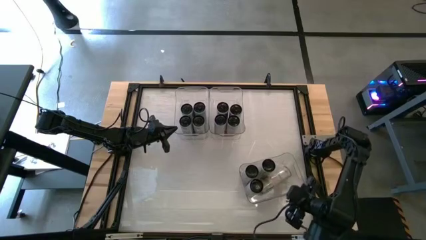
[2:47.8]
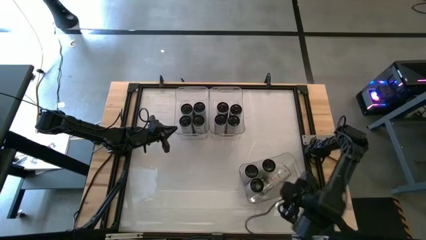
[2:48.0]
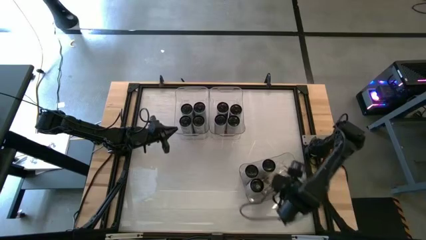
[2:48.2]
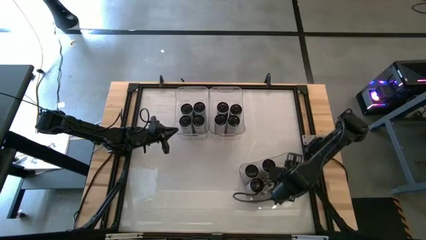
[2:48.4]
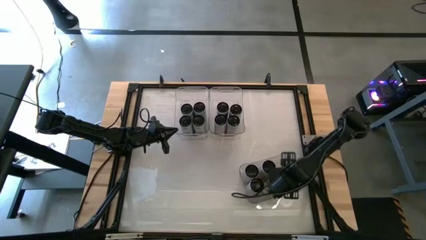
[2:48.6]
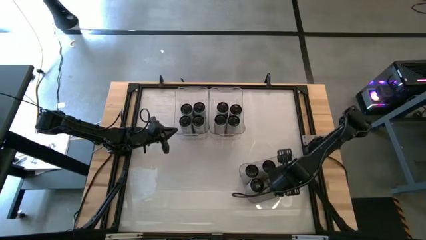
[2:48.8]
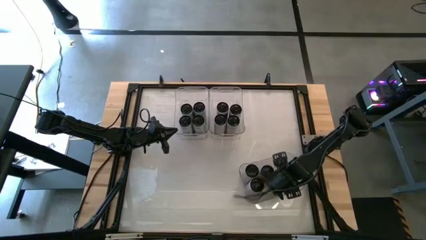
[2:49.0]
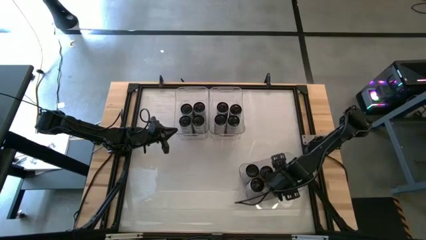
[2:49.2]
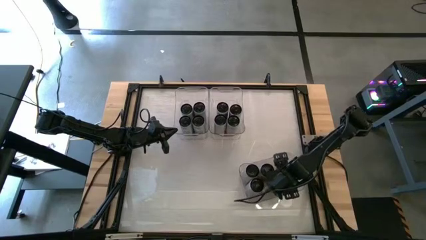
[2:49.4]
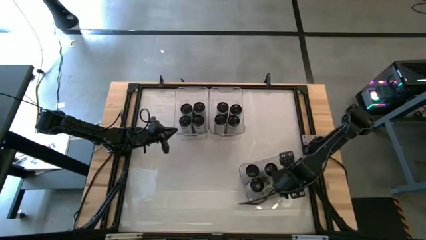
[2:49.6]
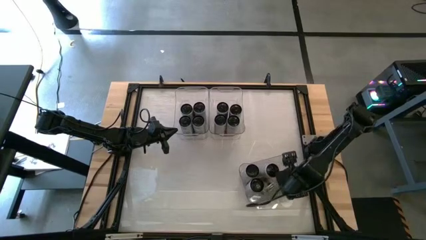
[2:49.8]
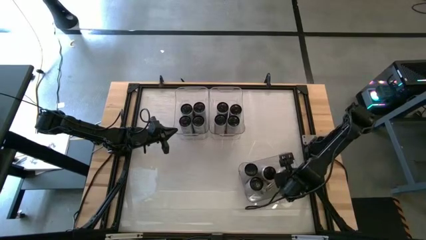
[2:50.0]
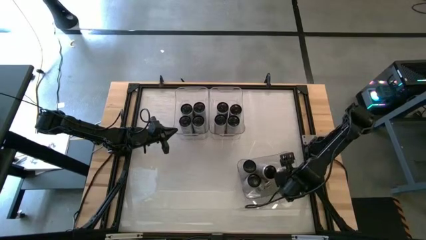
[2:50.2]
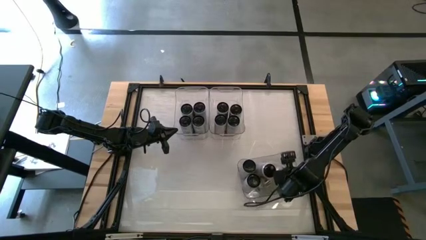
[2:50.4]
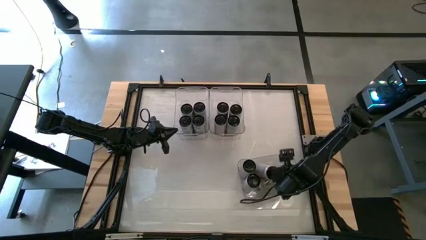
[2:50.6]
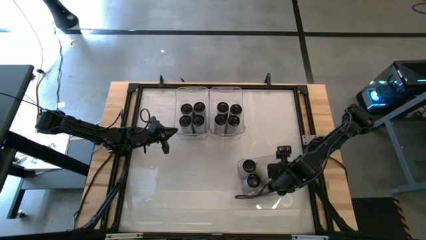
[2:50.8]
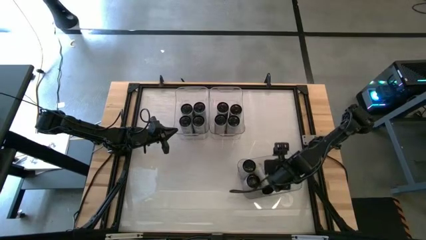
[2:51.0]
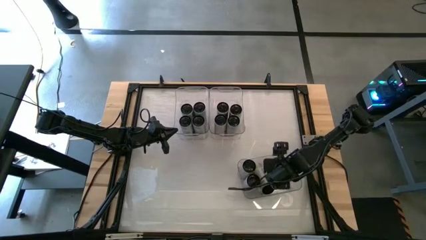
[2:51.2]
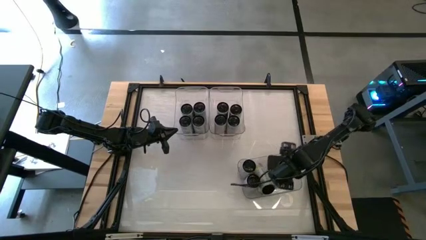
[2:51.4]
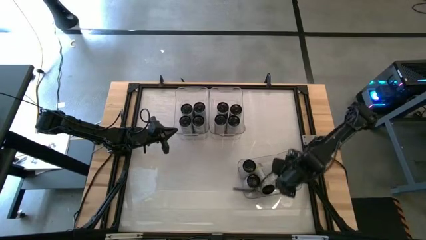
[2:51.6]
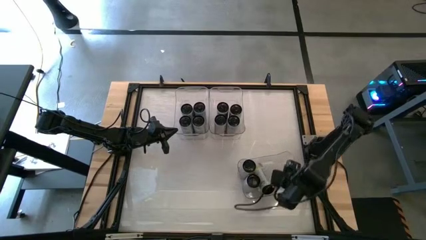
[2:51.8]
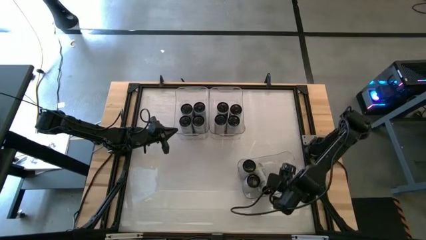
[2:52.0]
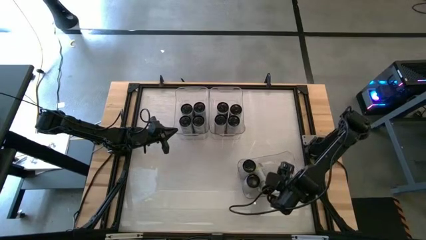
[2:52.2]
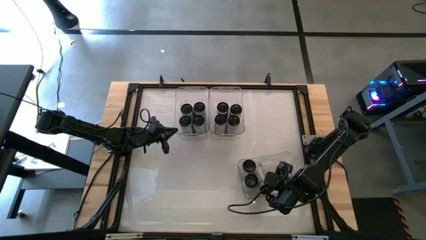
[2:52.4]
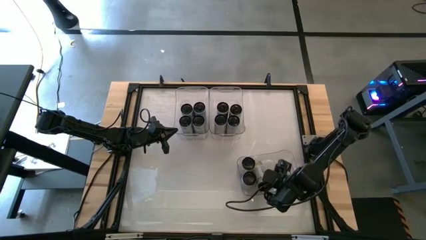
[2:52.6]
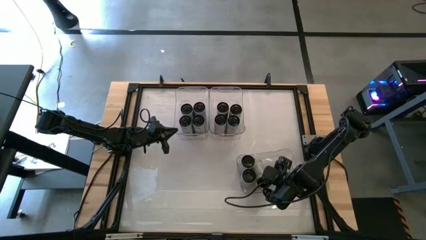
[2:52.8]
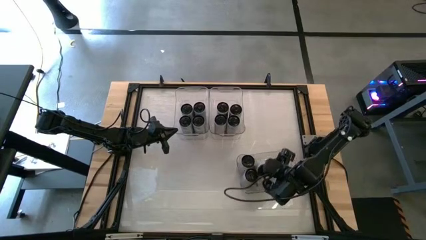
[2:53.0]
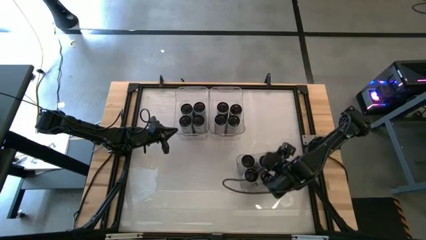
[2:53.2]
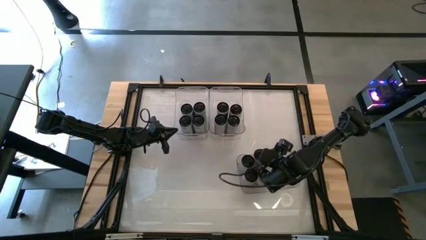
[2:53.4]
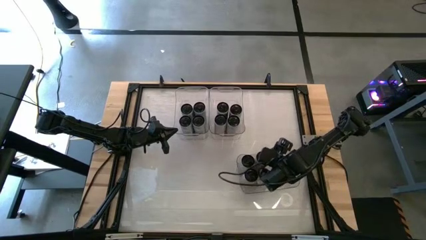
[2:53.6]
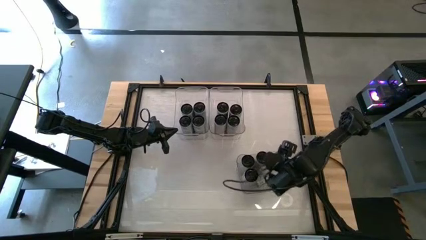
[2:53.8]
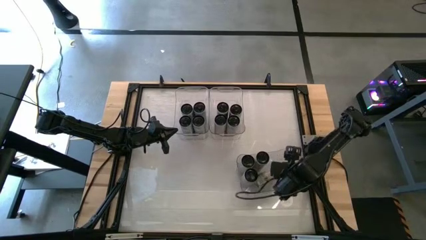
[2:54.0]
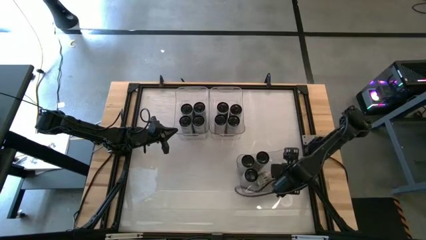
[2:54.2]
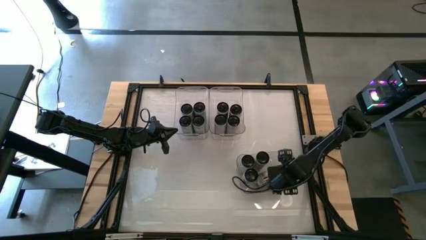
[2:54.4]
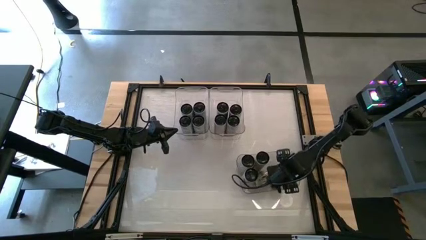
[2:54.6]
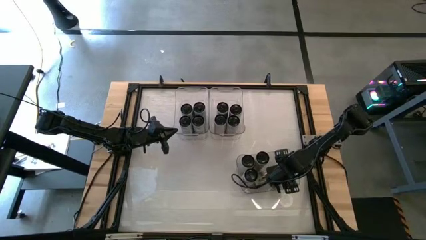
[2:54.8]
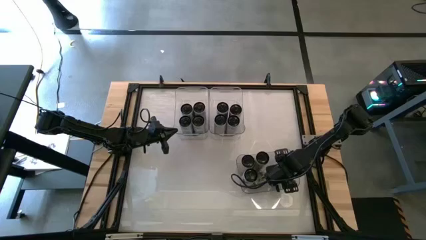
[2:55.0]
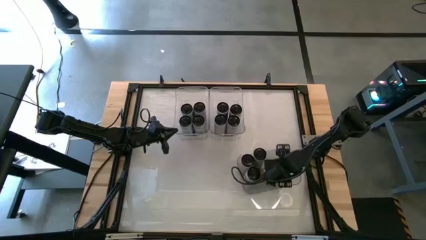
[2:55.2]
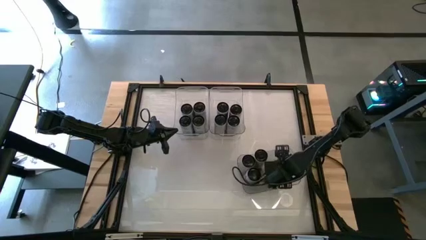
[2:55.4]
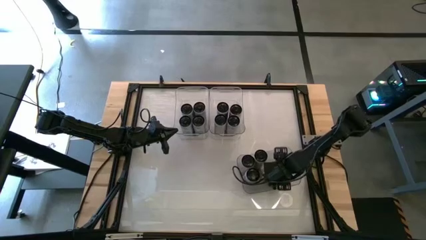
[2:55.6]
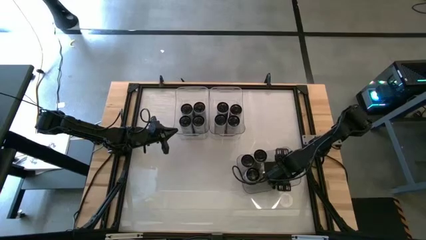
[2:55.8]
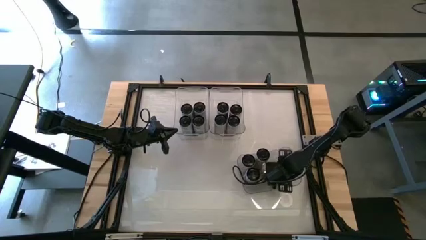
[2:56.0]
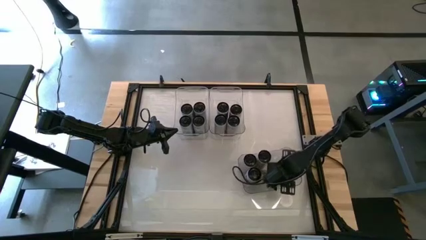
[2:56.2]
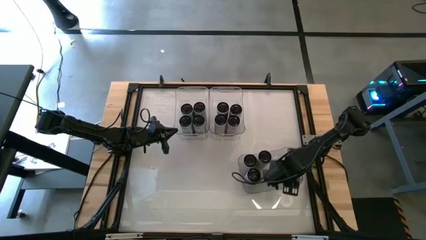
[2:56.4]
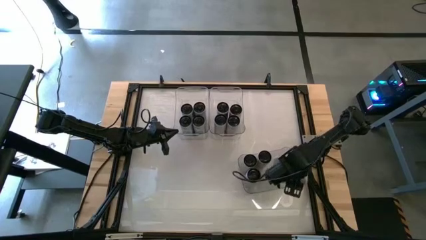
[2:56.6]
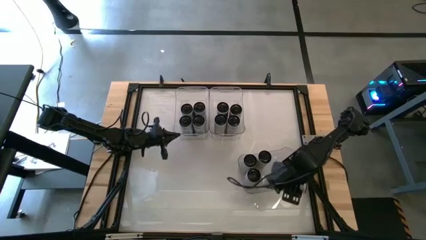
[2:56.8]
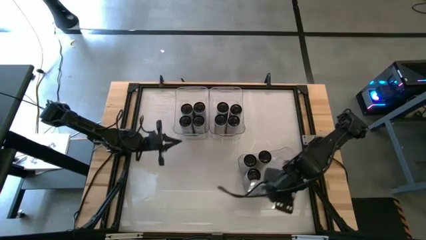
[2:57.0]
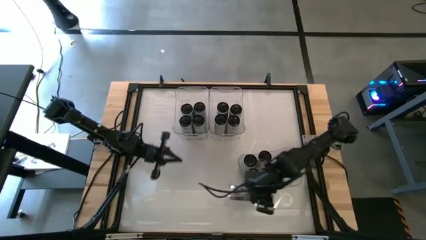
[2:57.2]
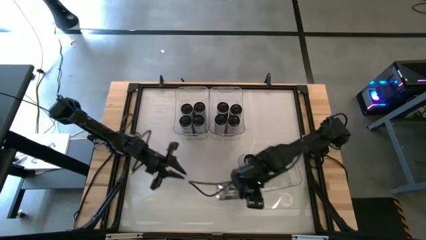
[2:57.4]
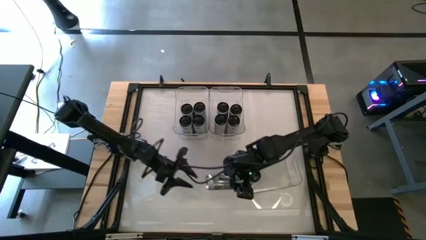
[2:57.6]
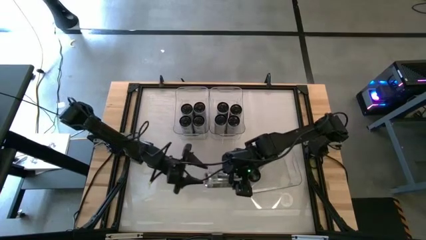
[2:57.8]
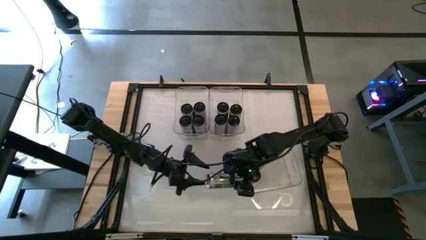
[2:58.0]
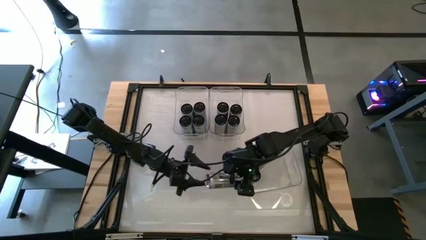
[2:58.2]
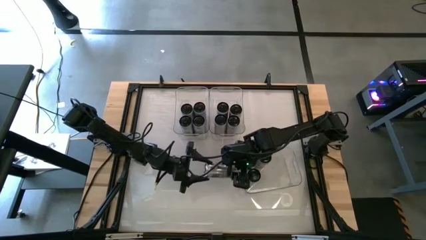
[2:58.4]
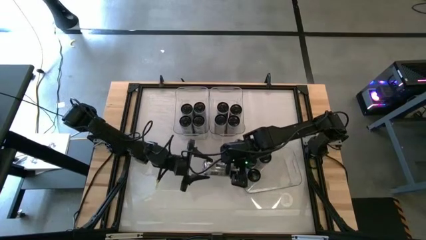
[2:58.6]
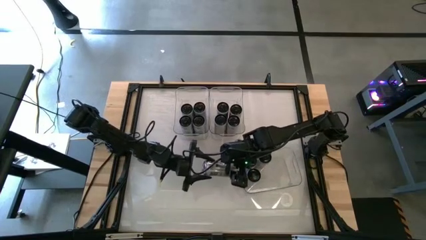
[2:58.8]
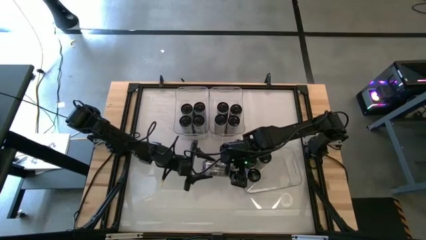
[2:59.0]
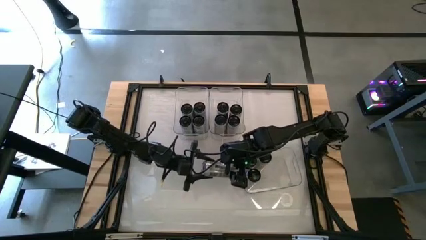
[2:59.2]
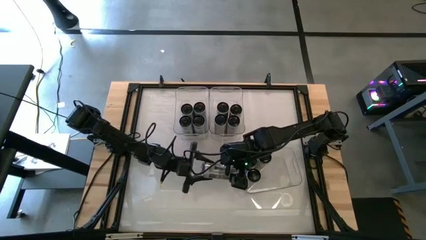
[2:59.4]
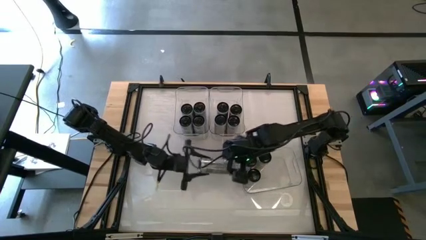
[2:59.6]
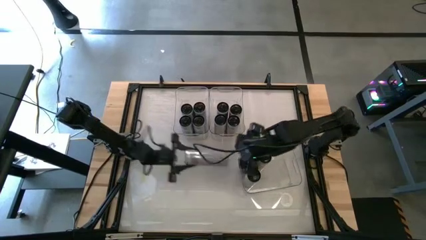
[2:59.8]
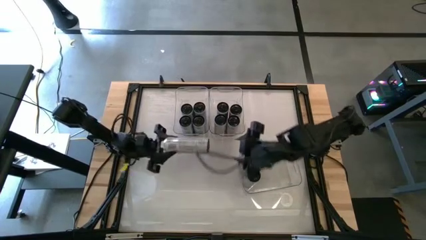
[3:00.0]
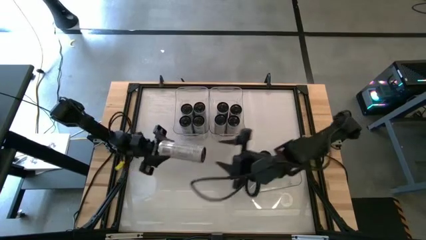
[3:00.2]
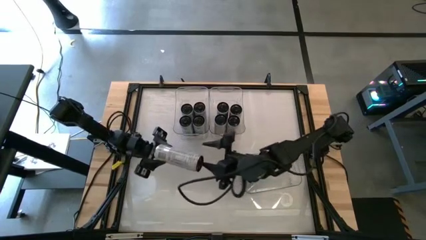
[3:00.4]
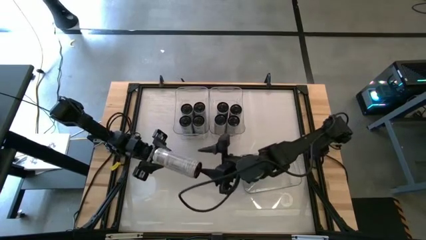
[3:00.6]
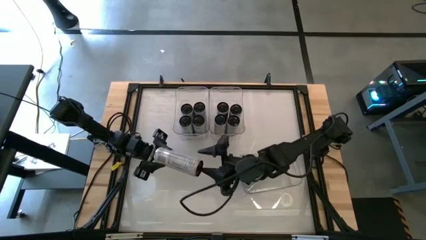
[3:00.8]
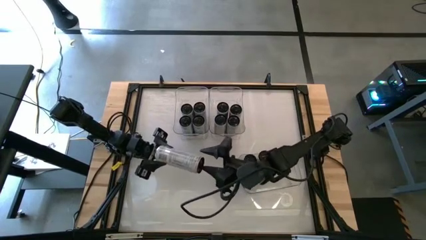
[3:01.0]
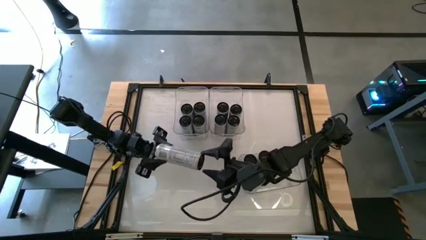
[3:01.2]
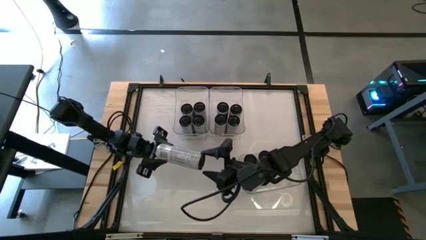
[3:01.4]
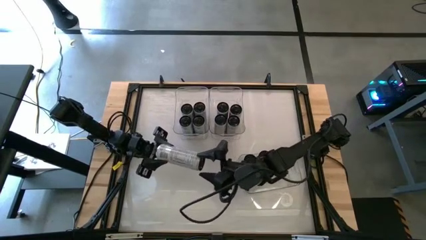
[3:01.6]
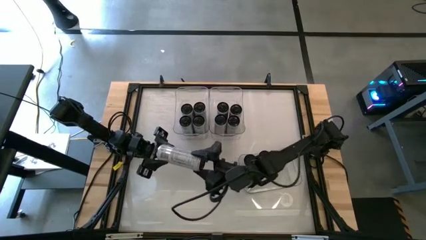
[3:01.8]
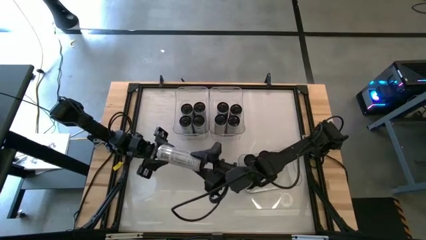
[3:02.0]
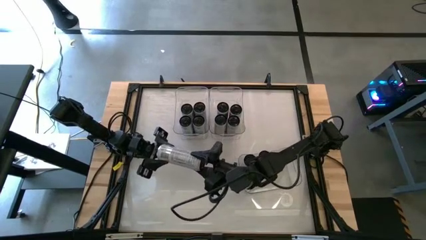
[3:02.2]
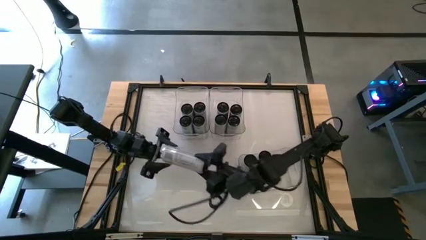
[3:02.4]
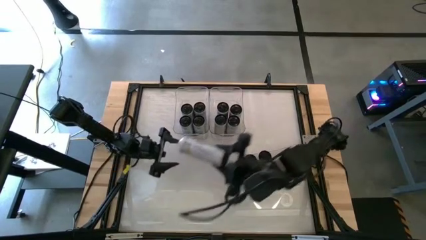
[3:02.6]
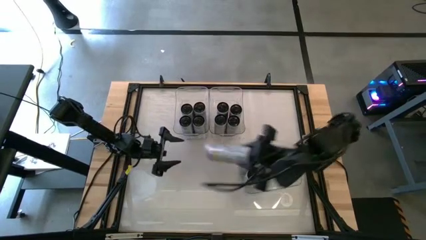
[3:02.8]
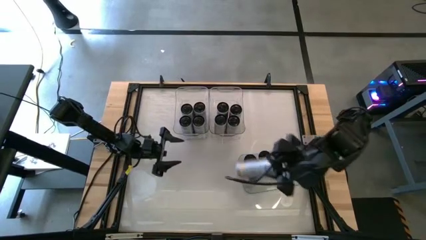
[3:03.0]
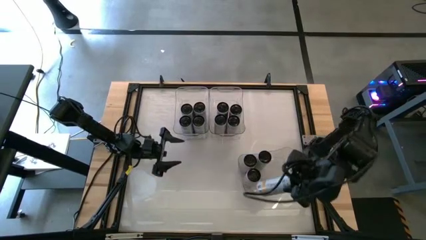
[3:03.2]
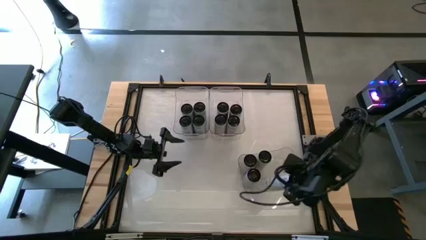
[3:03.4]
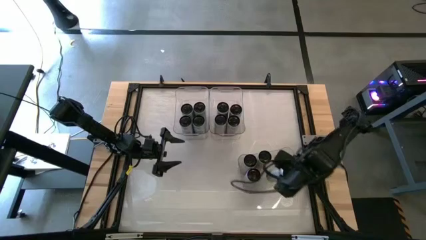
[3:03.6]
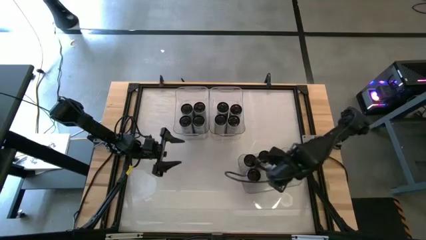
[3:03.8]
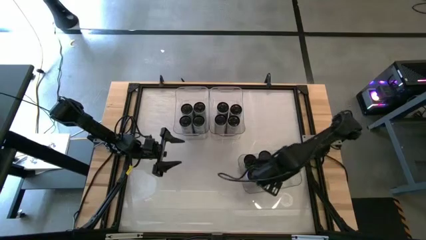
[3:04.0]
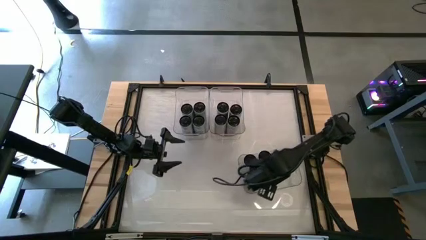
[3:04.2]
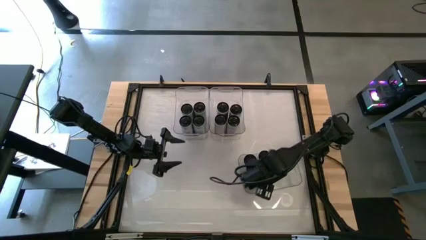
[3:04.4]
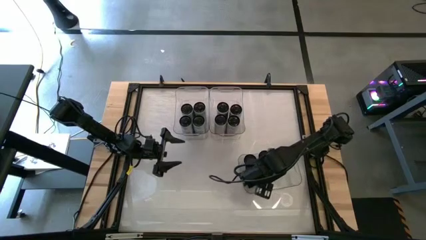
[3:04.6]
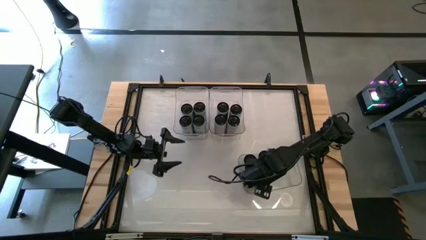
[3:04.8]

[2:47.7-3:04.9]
Task: Sort soda cans
Adjust the soda can in the bottom right transparent bin
